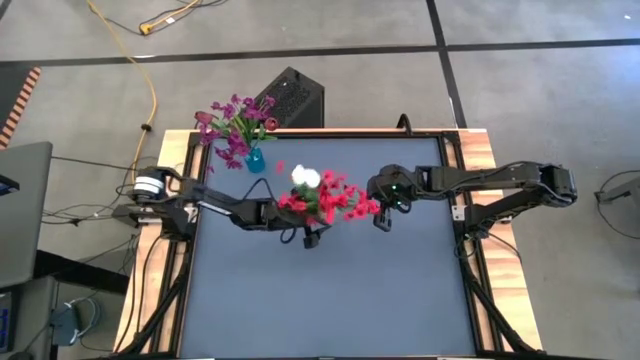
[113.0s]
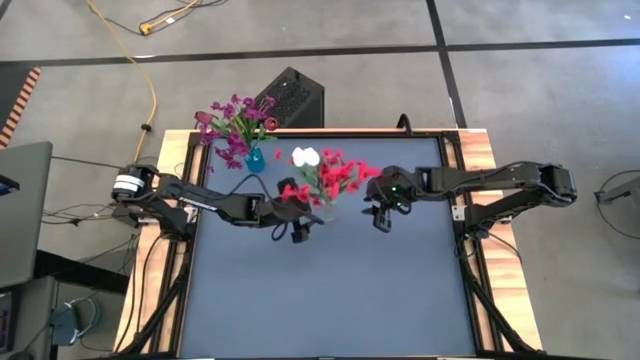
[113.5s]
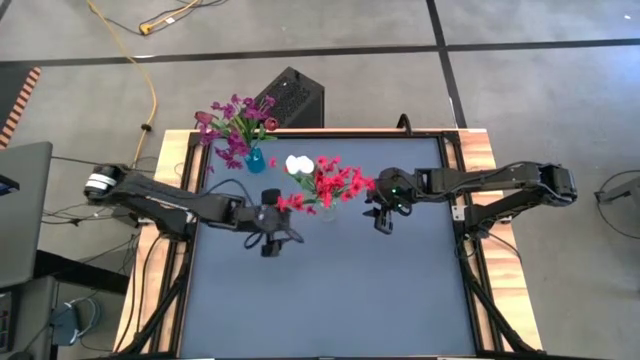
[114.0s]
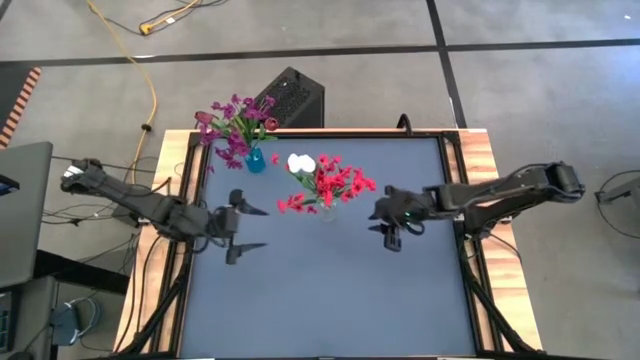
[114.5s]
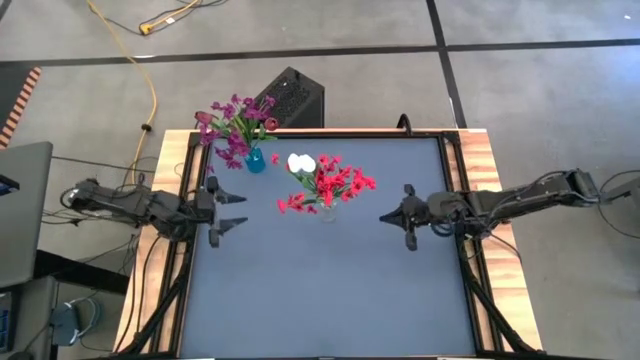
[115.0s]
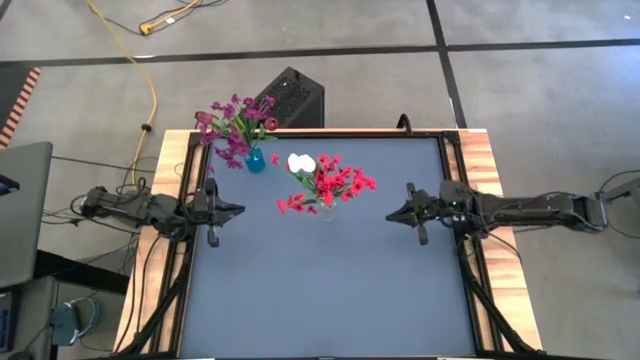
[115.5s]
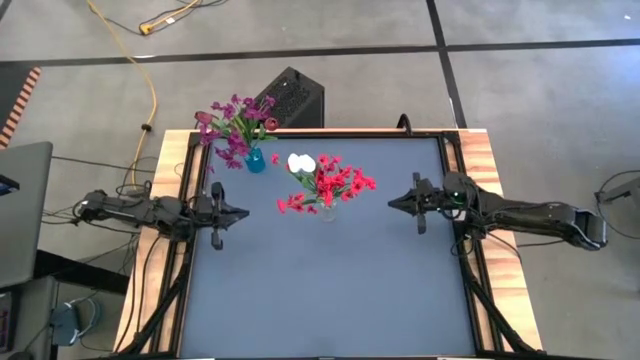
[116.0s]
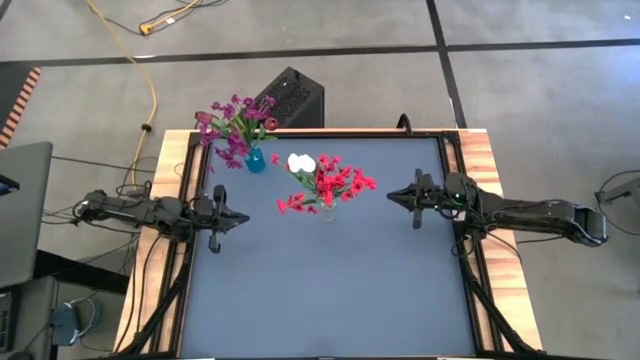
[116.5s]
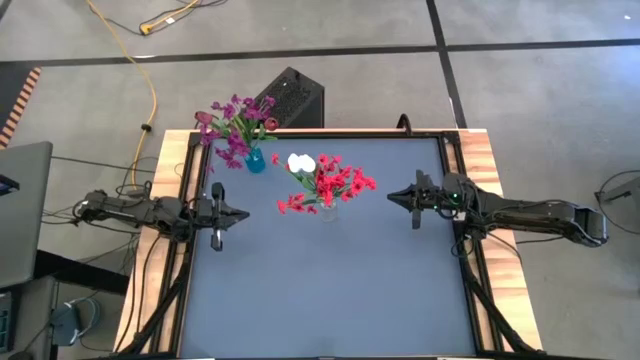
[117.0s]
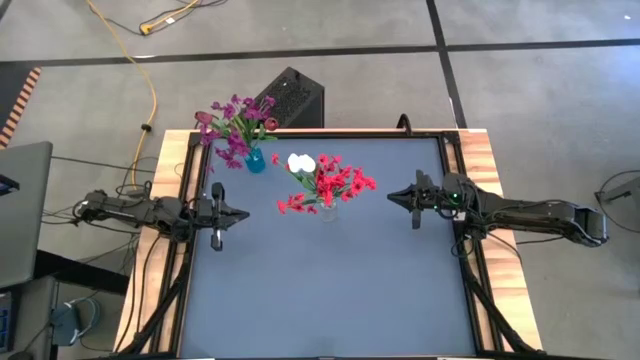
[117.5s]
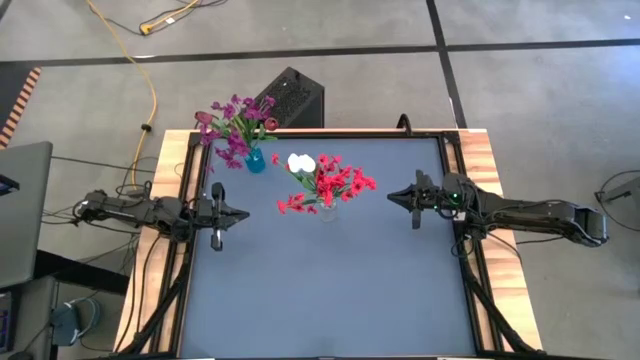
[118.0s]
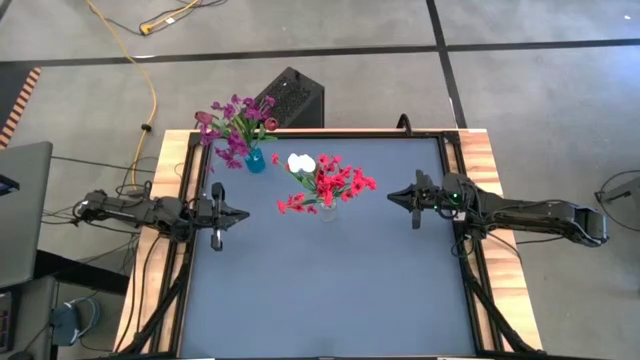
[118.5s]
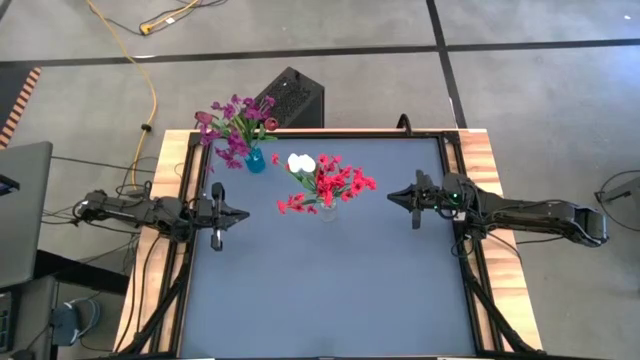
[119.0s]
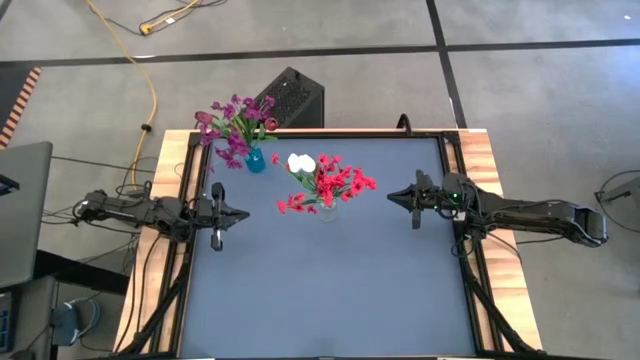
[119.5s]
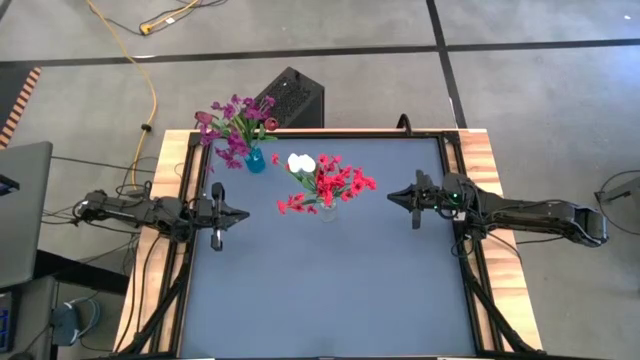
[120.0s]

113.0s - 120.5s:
Task: Sort flowers into vase by color
Return to Home Position

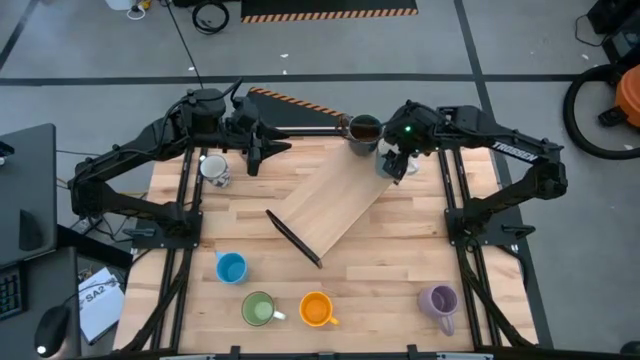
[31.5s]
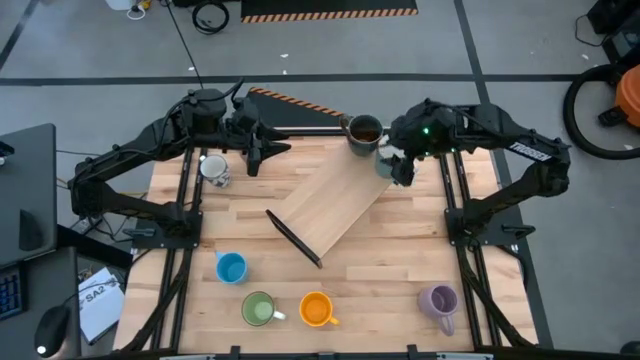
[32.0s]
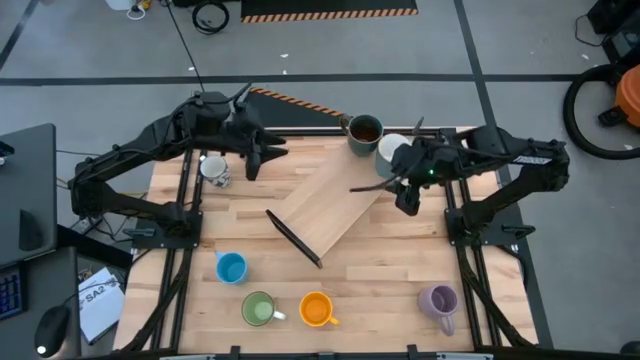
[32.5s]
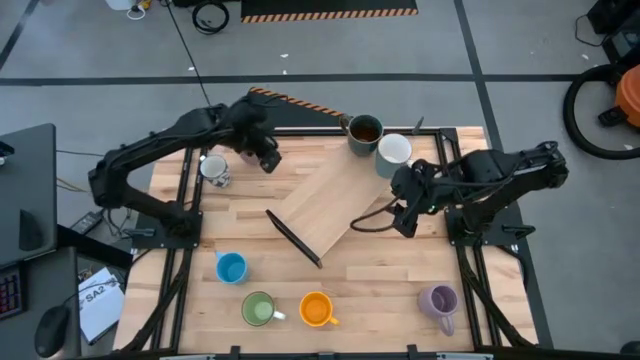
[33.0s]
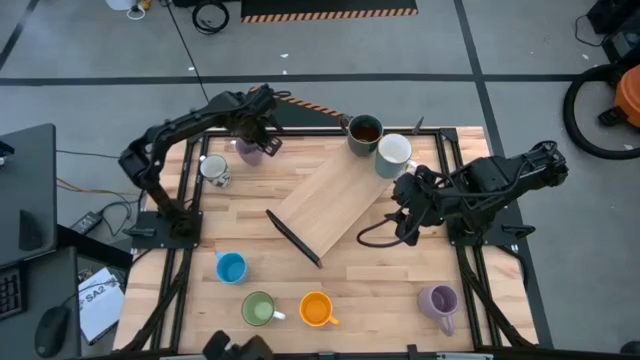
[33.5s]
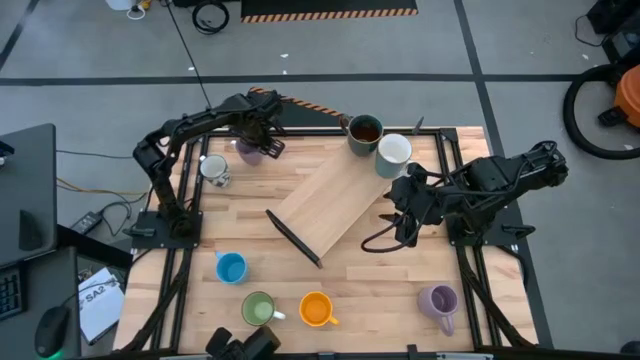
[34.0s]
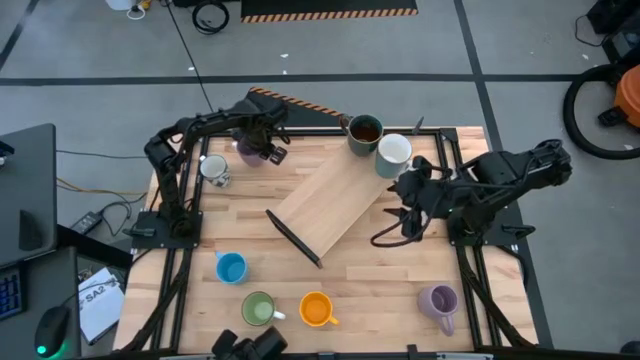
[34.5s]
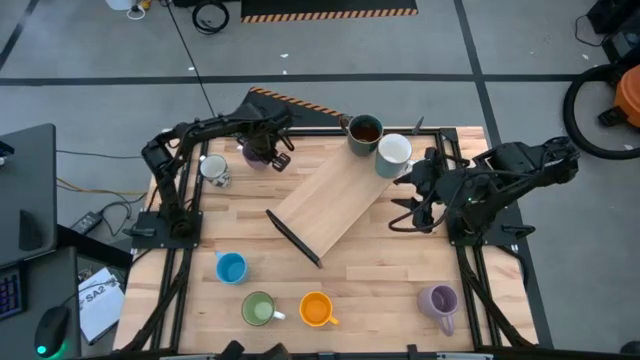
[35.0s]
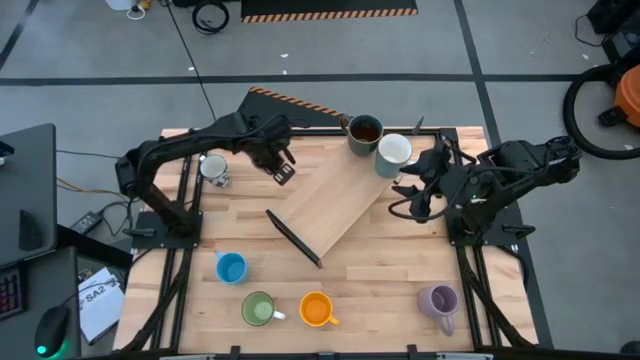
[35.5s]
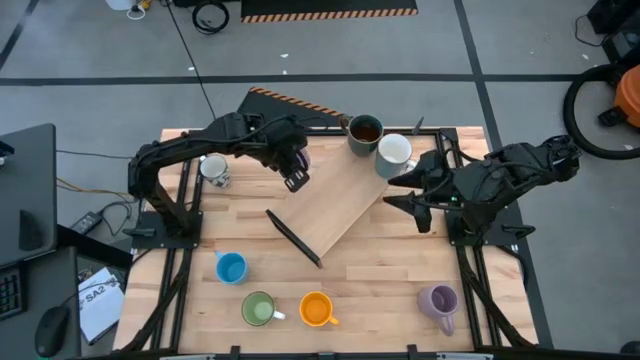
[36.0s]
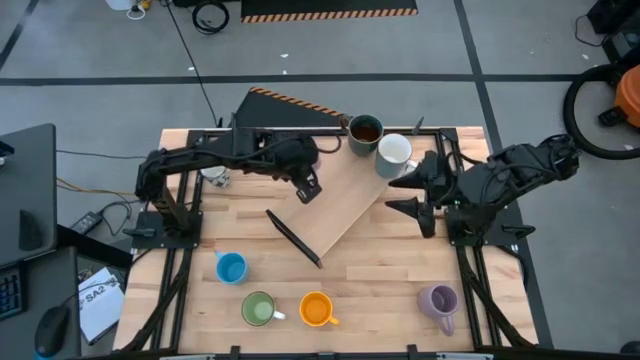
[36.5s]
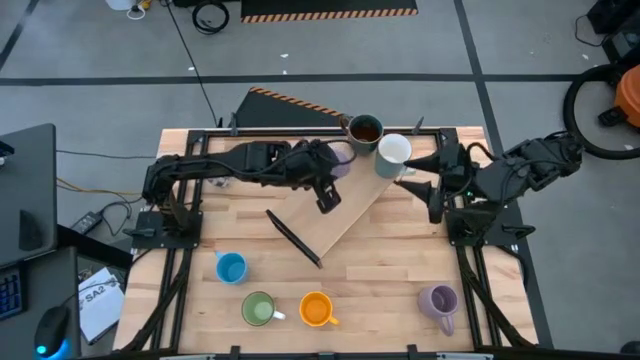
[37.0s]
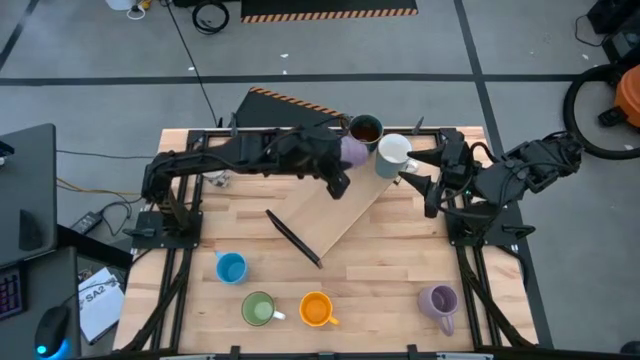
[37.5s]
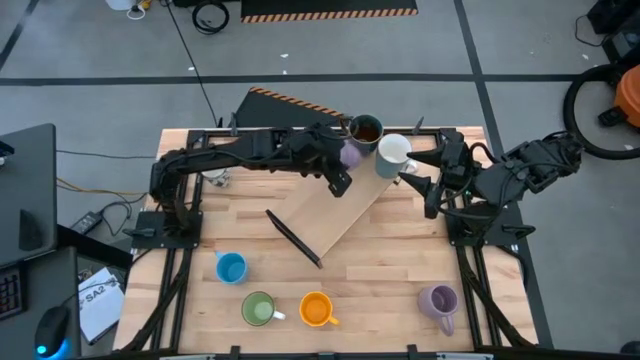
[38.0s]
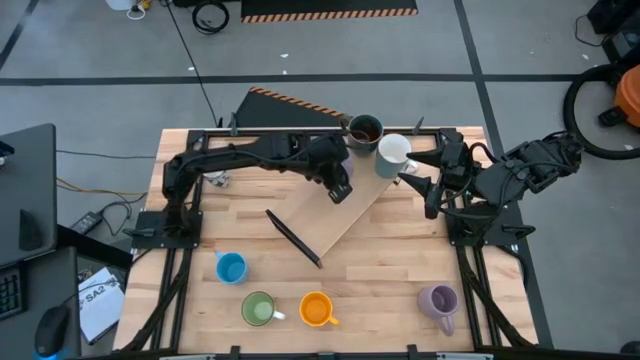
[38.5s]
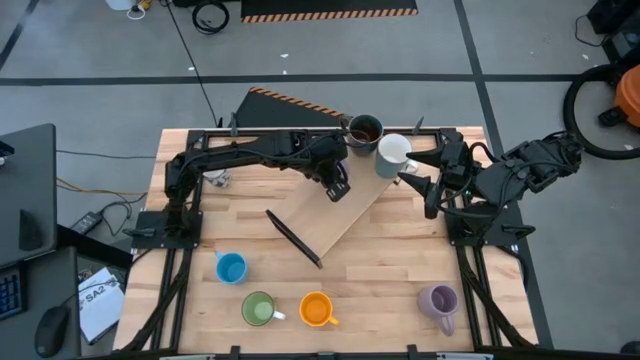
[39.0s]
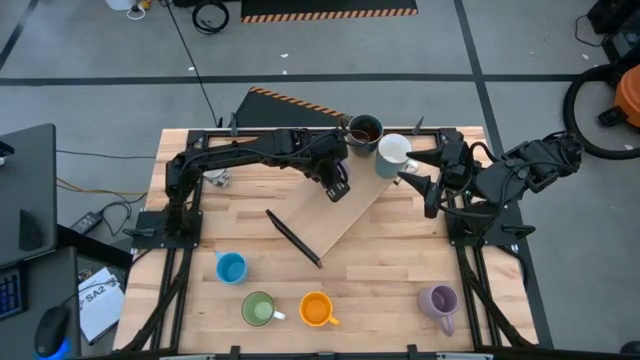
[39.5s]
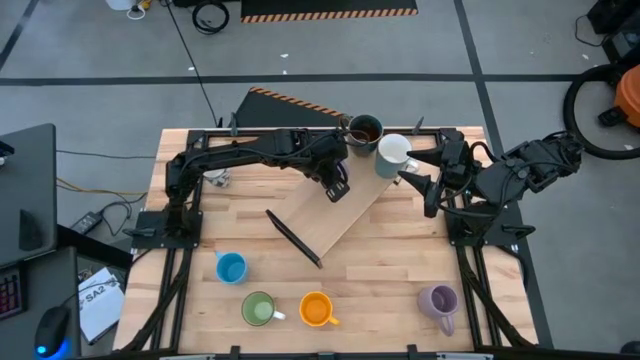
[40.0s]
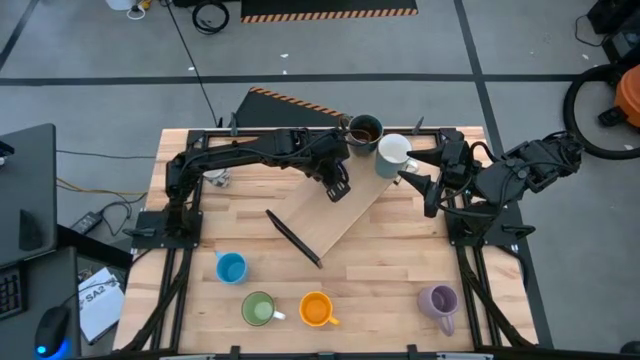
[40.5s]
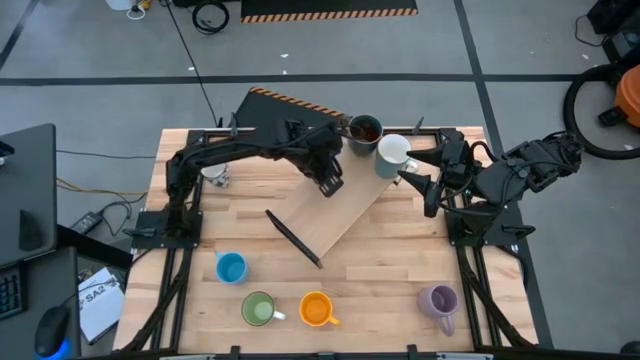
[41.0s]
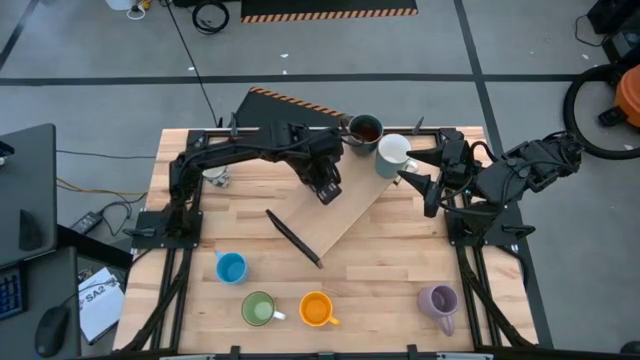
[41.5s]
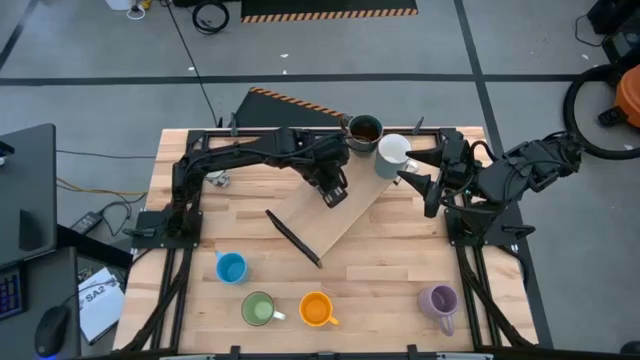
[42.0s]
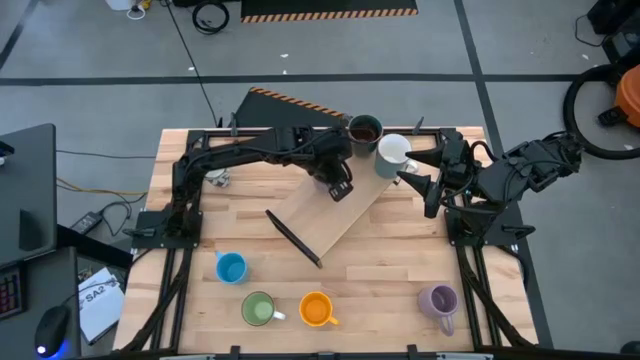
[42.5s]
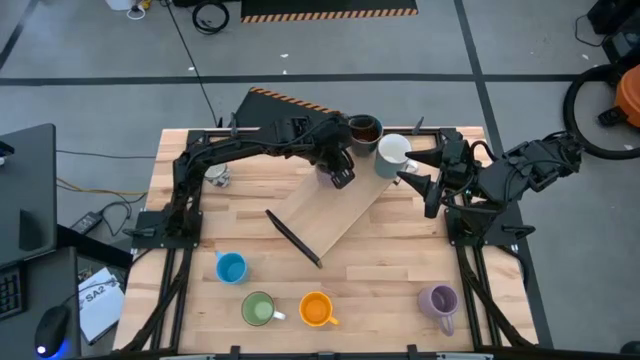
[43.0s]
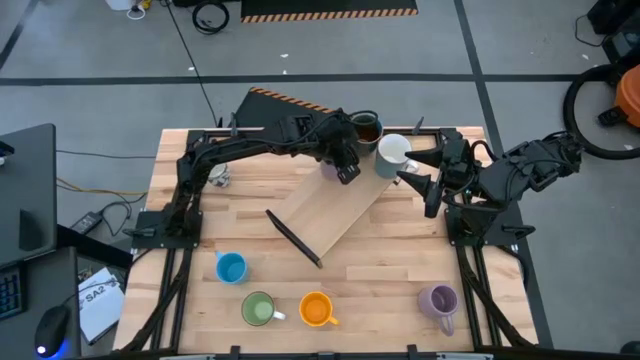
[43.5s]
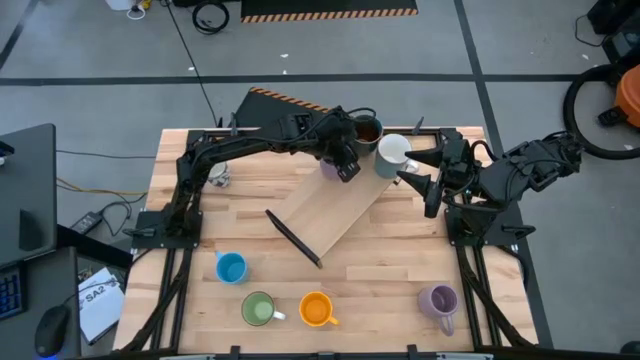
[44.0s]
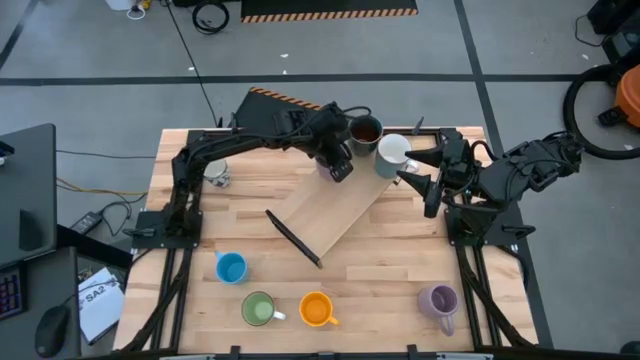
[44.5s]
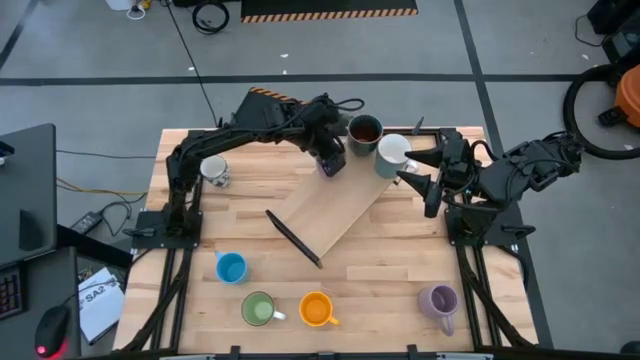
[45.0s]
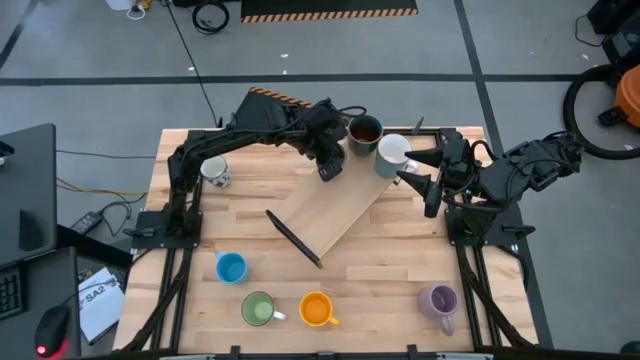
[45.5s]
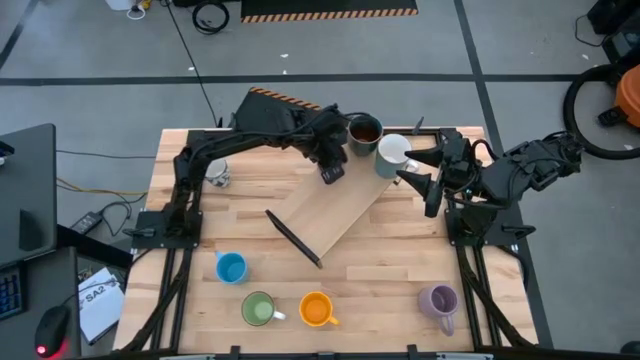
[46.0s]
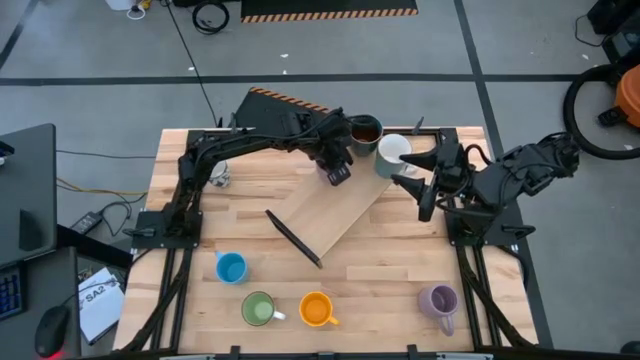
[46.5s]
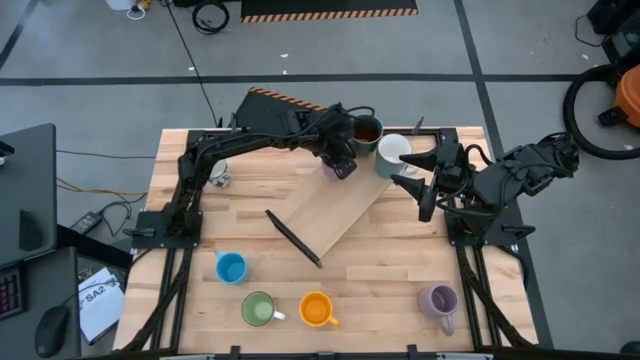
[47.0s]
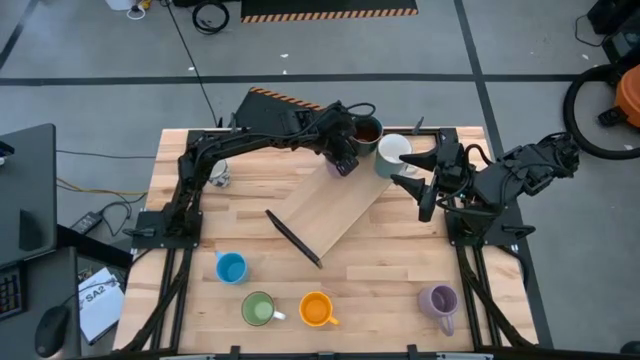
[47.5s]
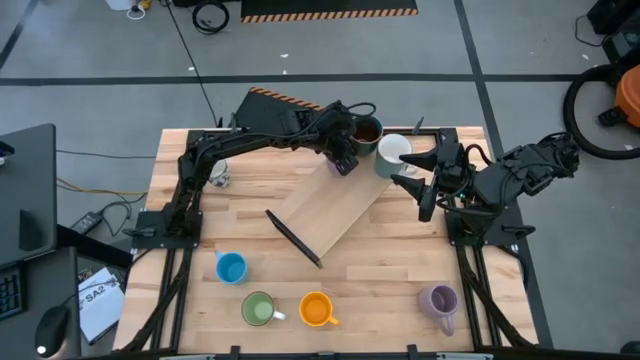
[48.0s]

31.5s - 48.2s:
Task: Place coffee mugs
Put the top violet mug on the shelf
